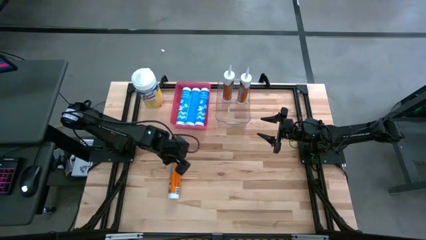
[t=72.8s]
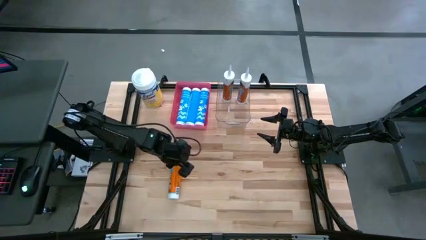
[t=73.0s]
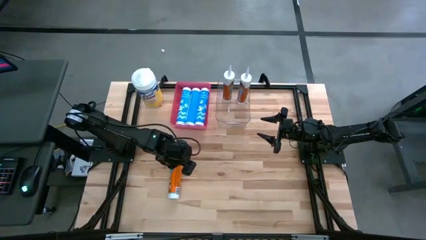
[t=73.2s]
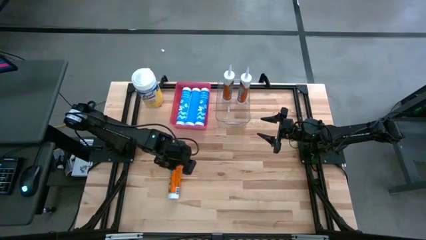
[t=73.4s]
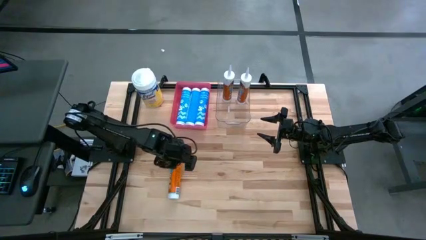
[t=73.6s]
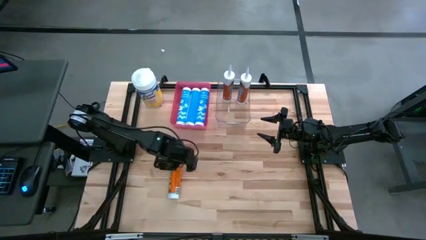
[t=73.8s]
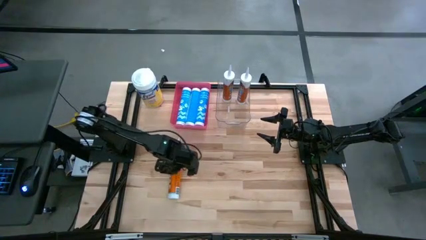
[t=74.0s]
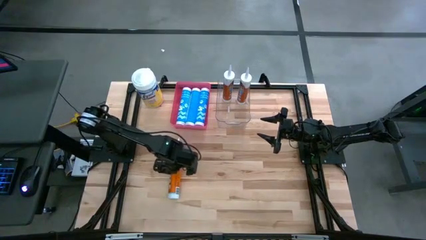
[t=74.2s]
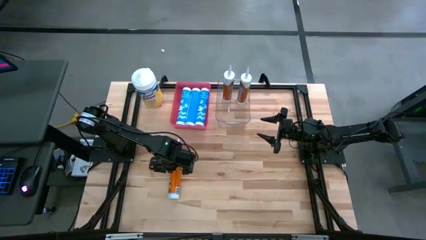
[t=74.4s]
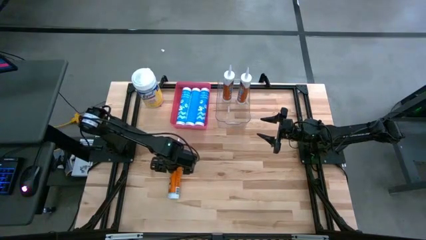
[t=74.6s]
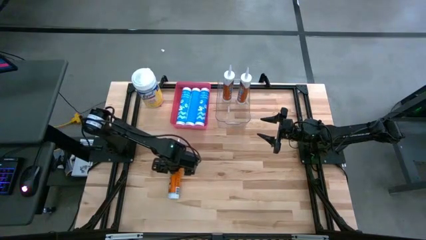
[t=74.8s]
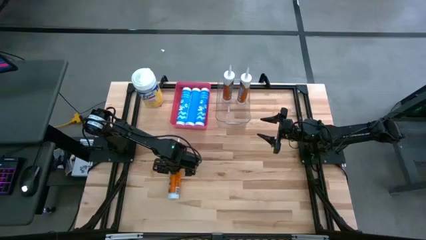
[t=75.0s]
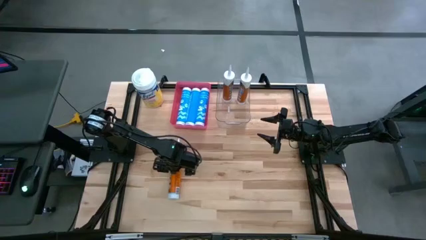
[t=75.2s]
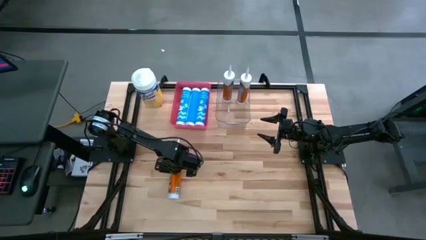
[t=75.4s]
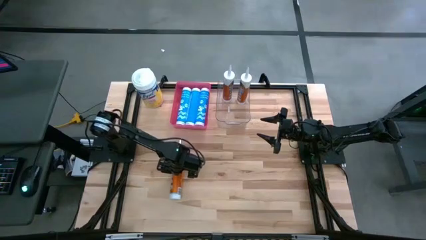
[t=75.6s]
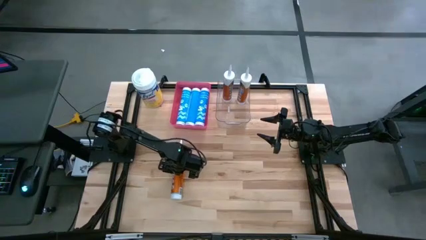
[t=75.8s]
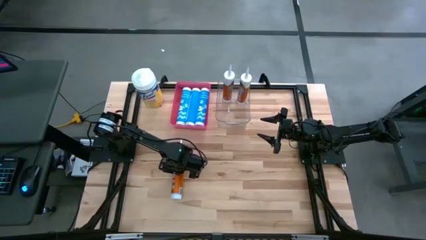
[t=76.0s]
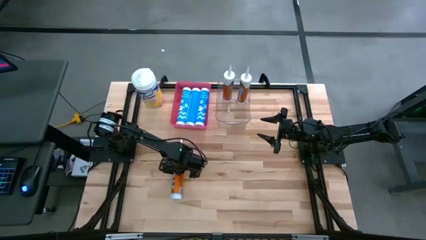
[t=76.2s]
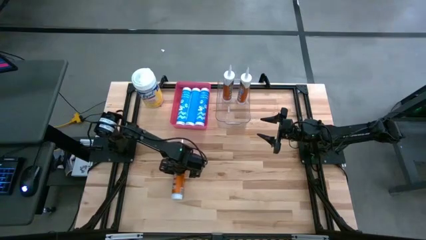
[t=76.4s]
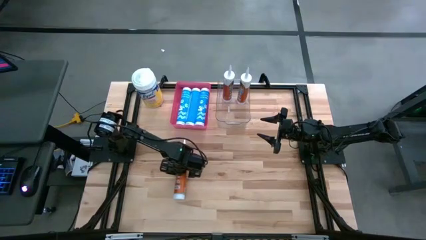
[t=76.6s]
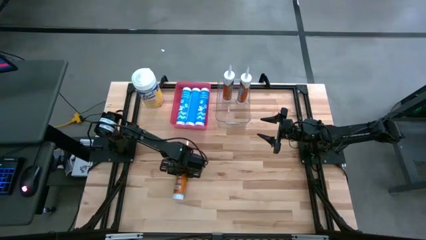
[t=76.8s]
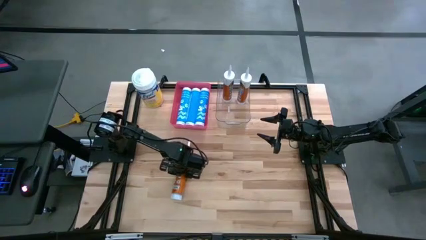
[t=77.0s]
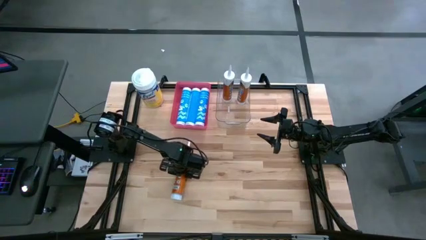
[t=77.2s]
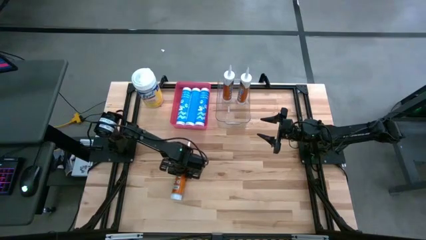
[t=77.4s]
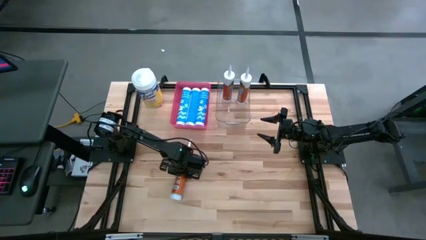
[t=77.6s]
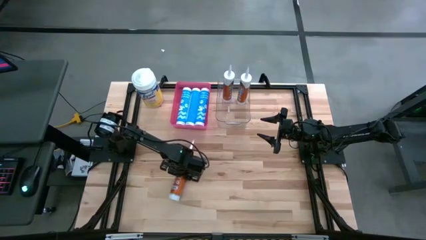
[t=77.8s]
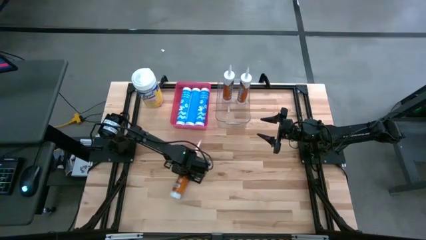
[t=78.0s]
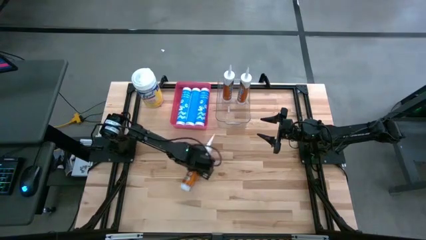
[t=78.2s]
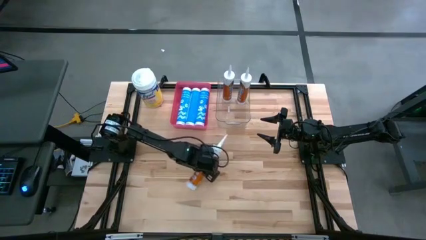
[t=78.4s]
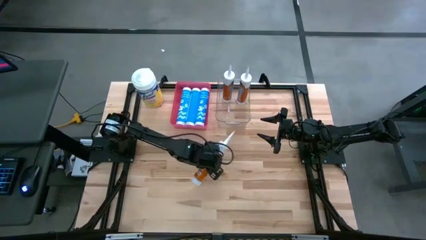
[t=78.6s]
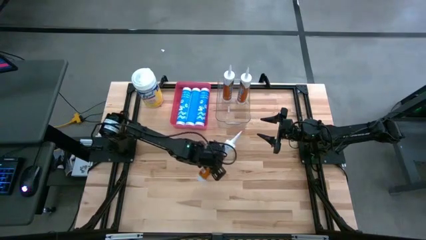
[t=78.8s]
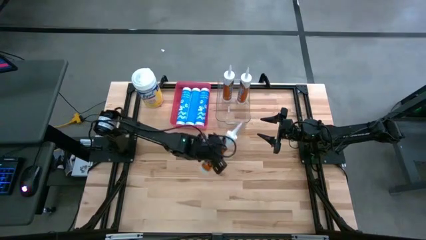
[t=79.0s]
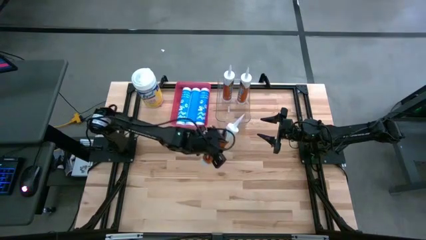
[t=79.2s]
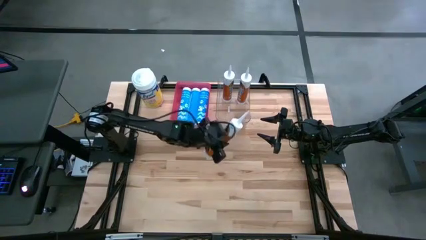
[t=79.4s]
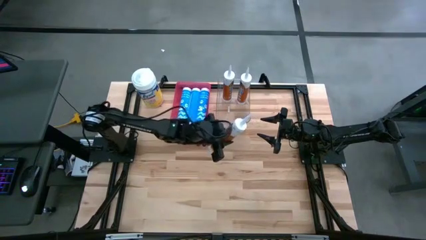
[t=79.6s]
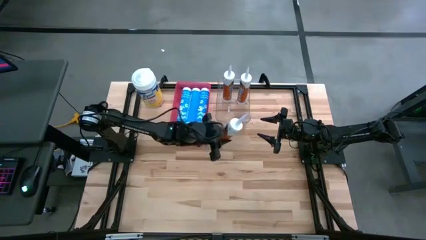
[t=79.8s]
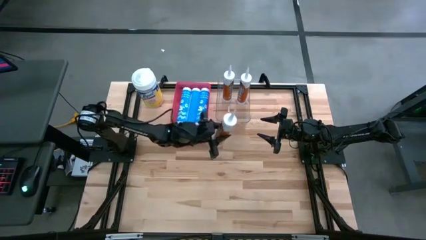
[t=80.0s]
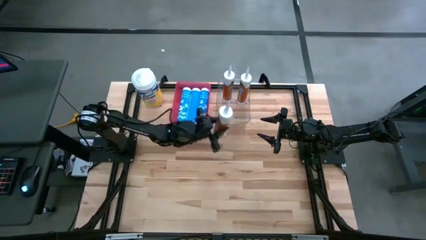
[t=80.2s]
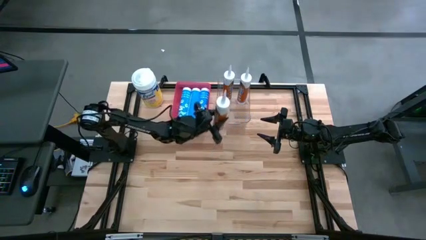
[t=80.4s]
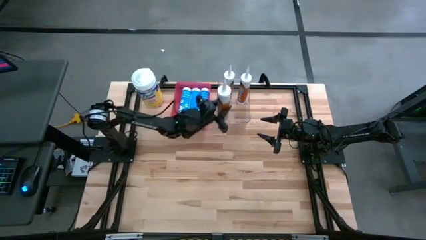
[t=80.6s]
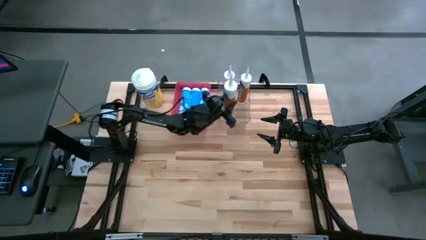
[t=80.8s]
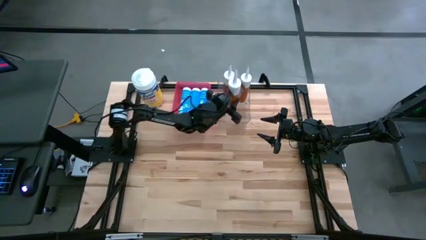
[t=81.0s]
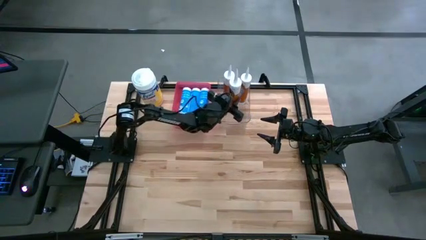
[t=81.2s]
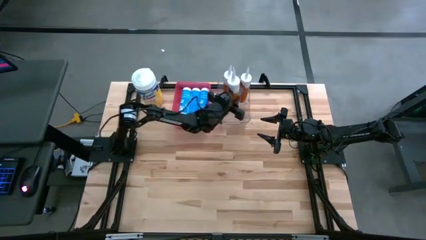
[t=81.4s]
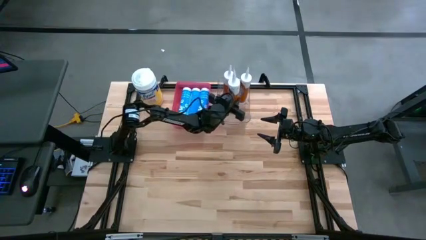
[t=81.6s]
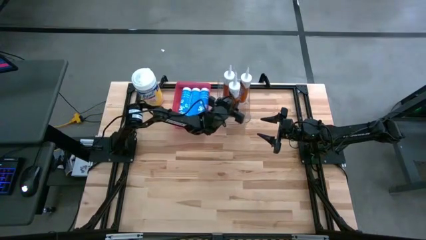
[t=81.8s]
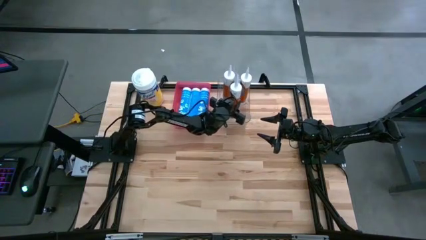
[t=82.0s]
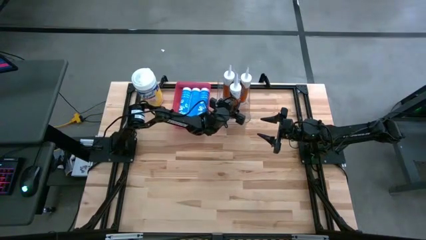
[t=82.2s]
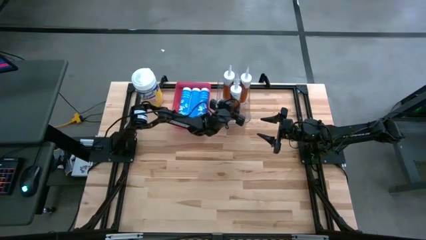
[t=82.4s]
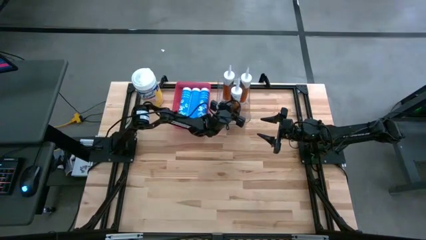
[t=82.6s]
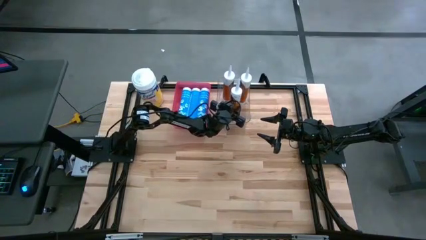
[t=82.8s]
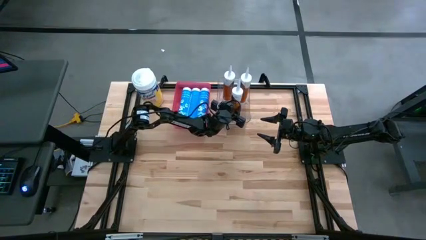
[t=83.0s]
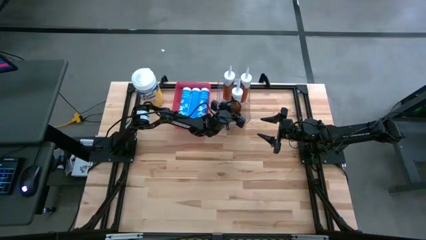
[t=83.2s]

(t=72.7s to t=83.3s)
Task: Sort silicone sealant tubes
Put the orange silicone sealant into the transparent bin

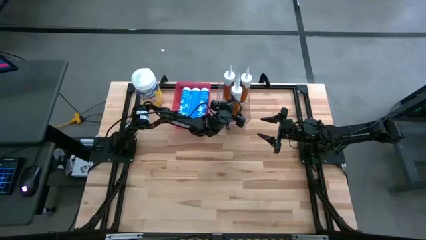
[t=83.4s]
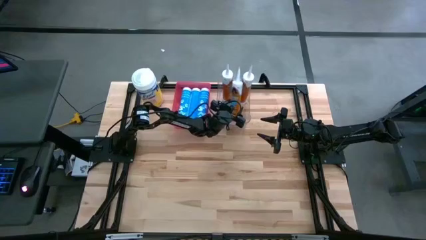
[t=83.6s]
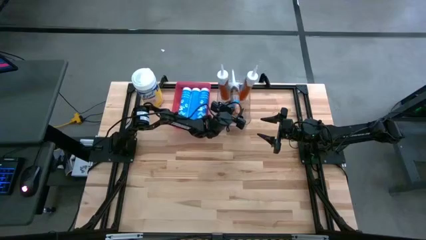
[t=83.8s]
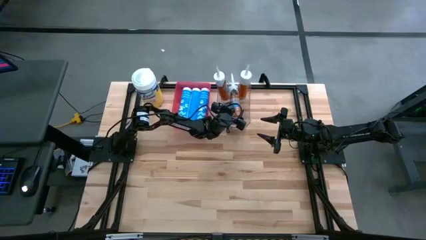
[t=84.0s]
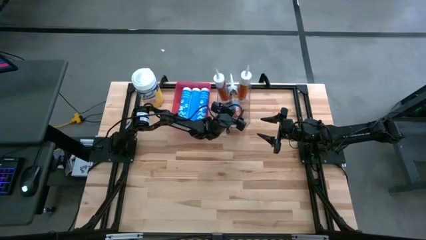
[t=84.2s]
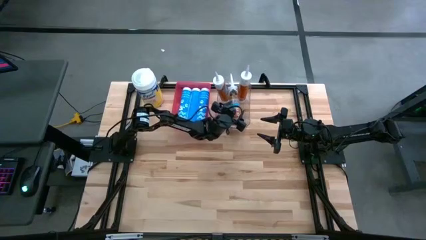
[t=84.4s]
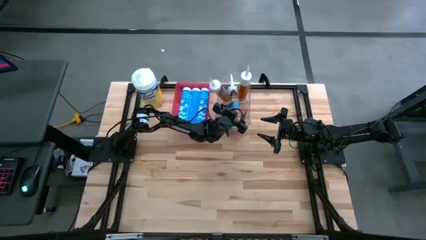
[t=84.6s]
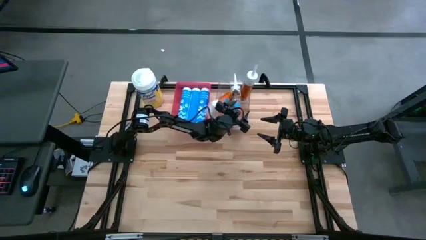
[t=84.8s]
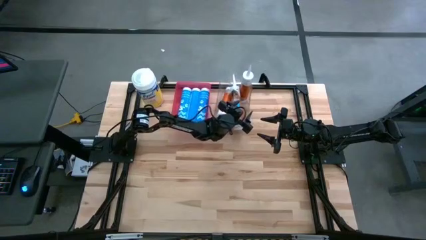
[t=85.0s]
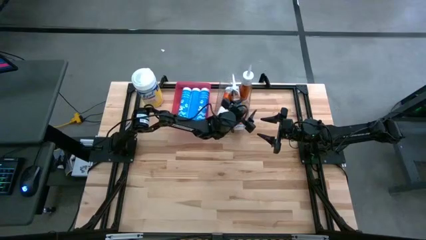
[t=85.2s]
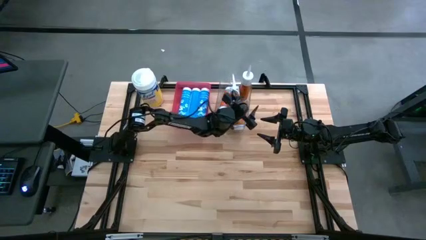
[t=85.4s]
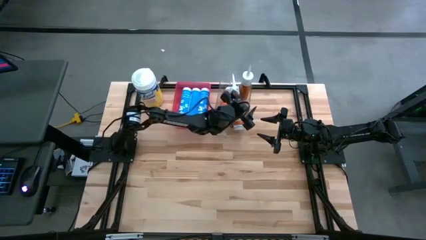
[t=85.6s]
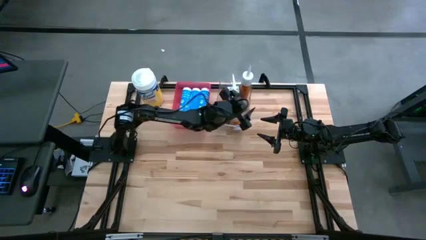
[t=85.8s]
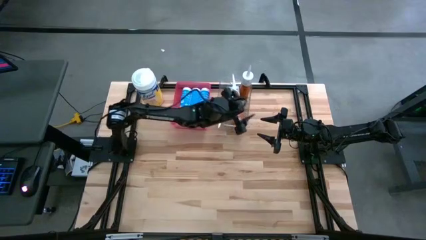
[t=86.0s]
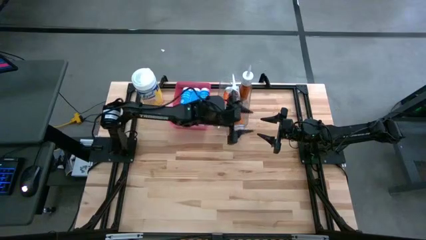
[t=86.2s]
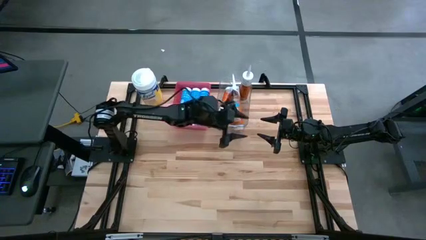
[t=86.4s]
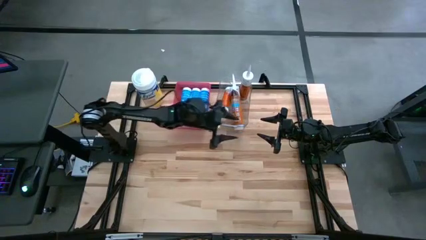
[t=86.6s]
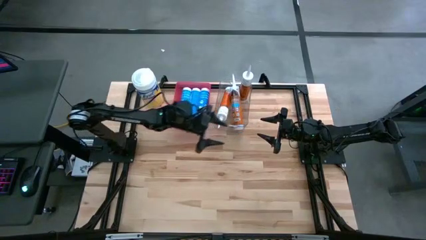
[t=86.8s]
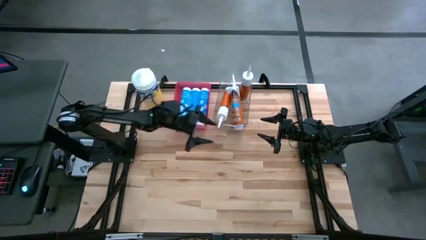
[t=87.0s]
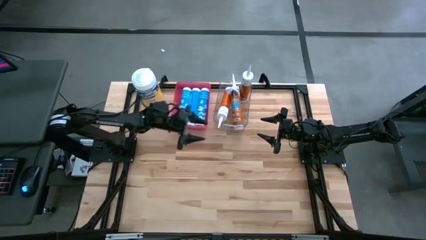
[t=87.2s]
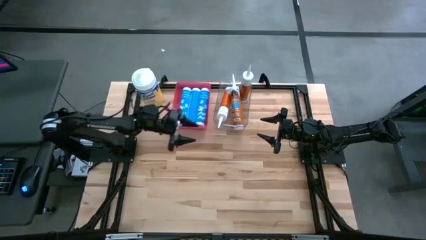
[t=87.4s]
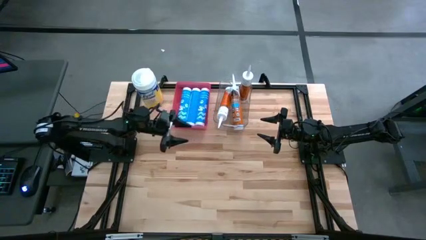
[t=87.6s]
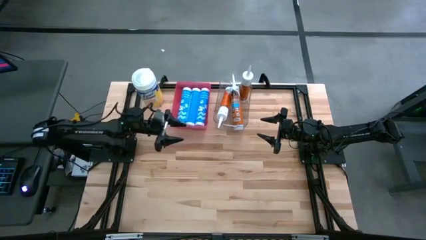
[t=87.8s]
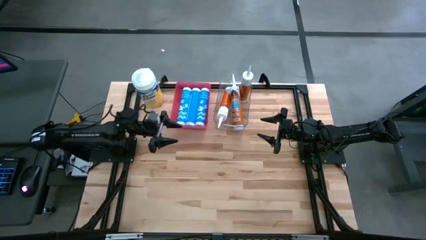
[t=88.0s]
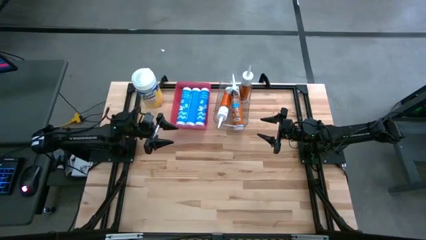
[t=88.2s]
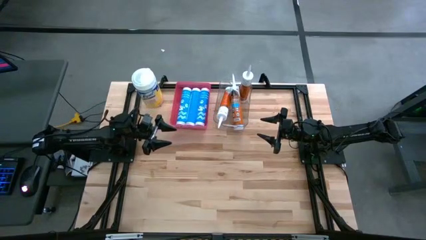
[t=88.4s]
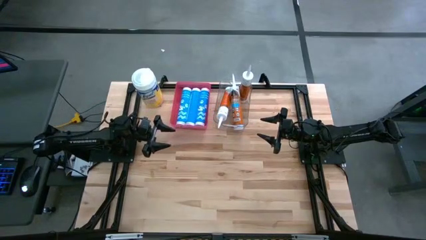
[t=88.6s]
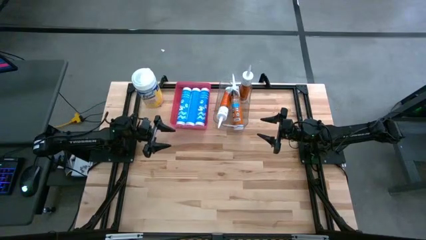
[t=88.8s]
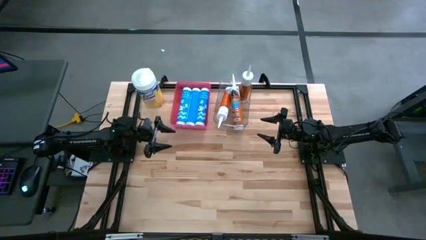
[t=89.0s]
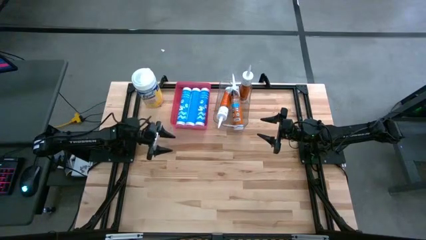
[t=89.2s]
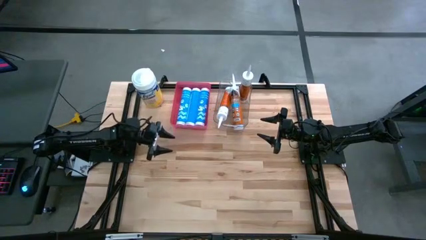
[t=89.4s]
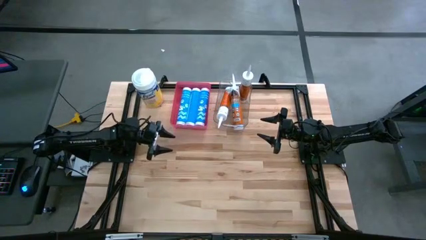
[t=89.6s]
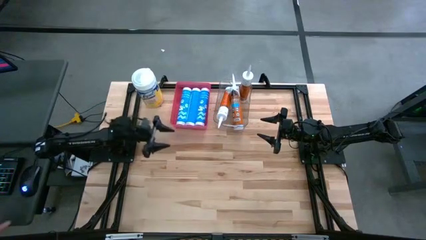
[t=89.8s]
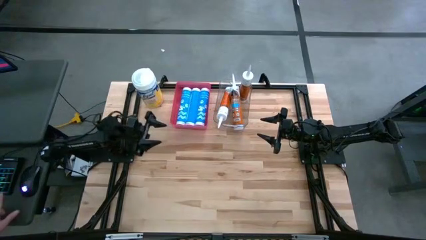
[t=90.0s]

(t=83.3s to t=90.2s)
Return to Home Position
